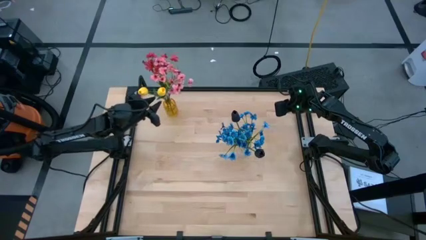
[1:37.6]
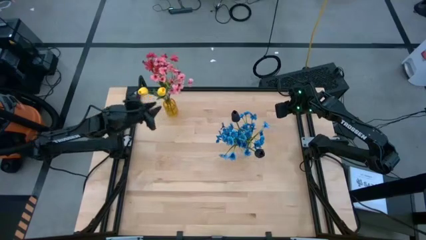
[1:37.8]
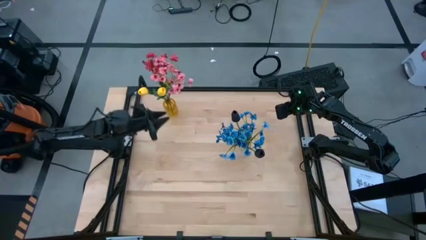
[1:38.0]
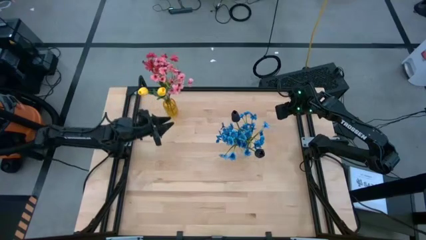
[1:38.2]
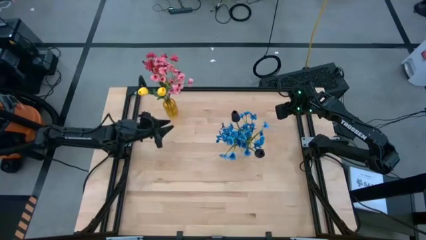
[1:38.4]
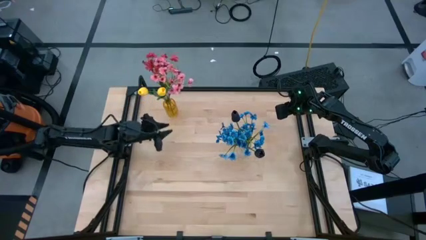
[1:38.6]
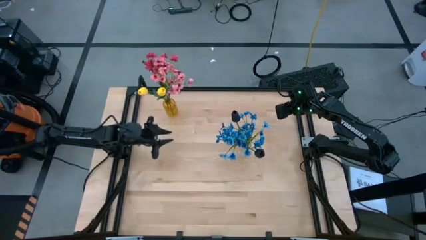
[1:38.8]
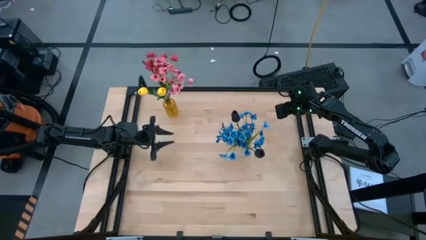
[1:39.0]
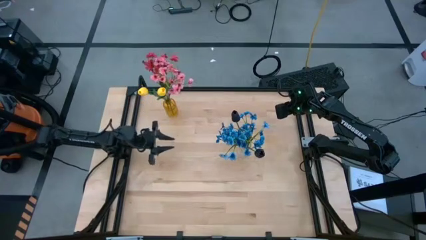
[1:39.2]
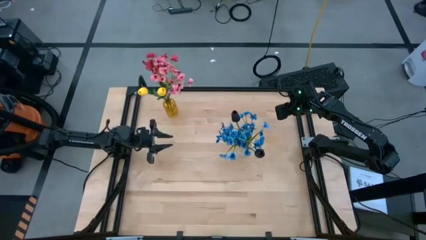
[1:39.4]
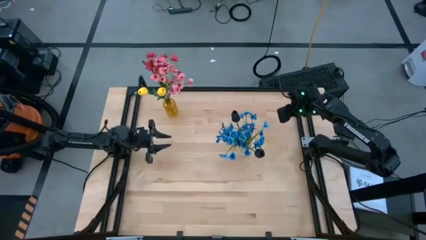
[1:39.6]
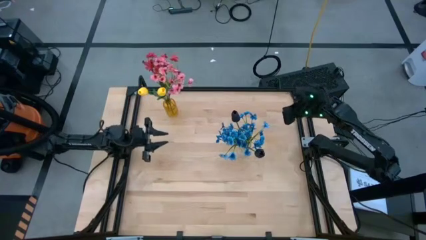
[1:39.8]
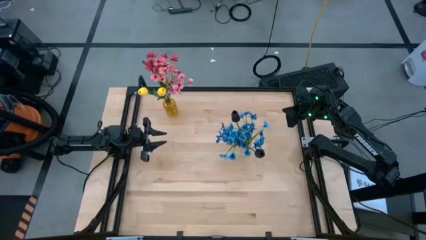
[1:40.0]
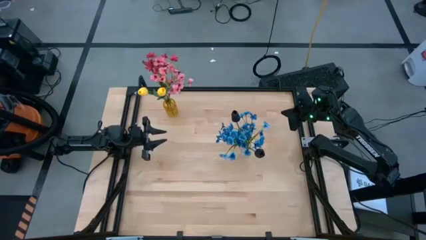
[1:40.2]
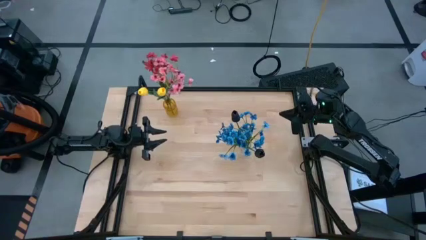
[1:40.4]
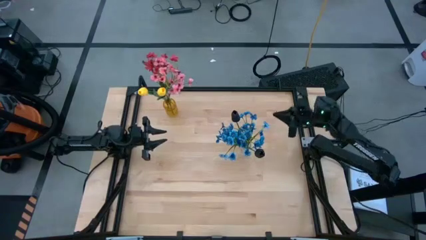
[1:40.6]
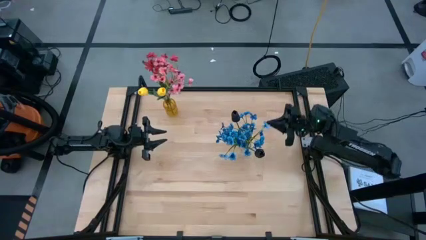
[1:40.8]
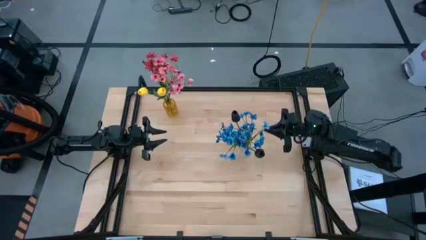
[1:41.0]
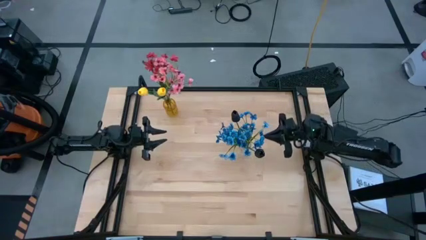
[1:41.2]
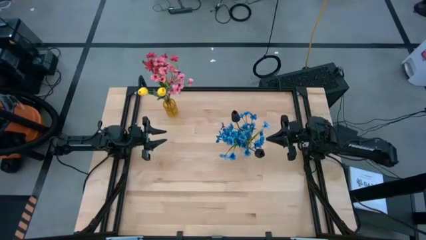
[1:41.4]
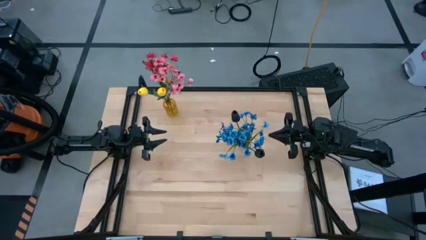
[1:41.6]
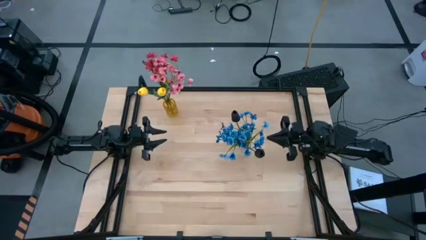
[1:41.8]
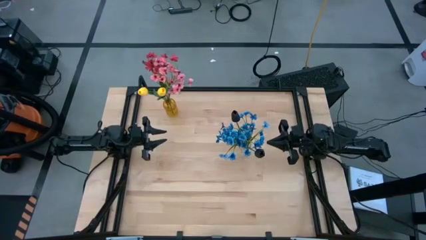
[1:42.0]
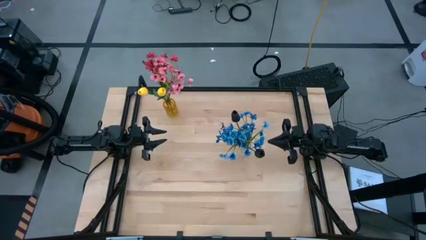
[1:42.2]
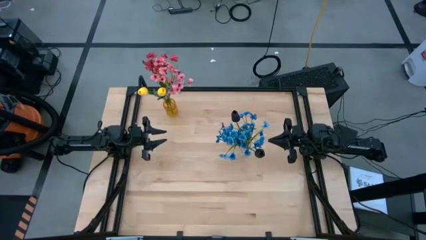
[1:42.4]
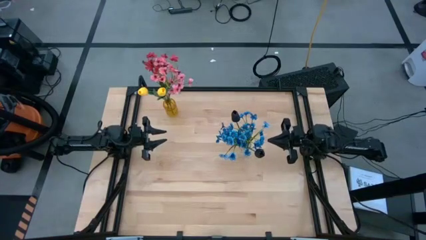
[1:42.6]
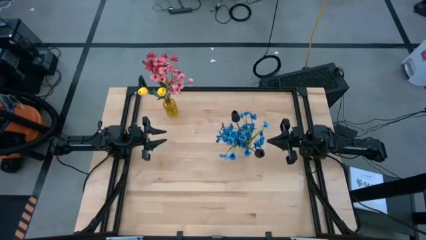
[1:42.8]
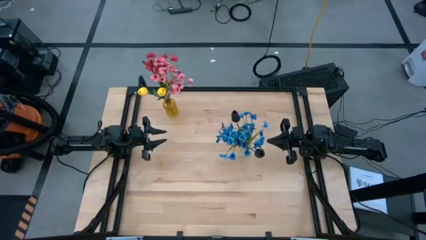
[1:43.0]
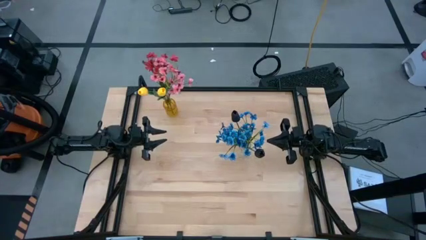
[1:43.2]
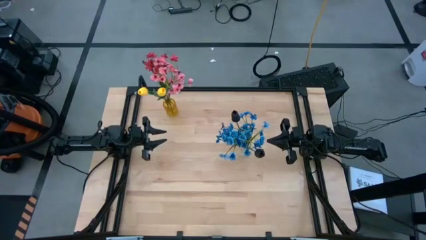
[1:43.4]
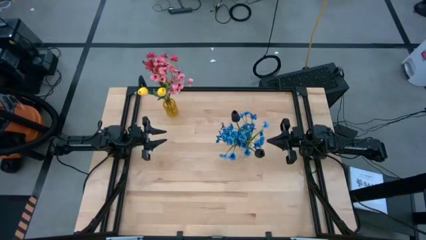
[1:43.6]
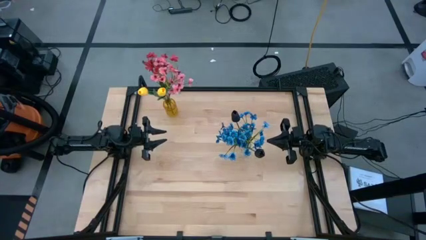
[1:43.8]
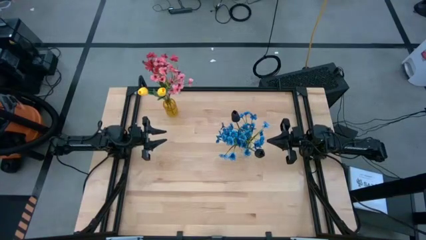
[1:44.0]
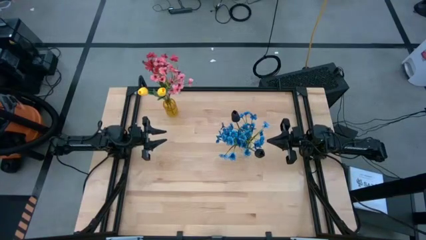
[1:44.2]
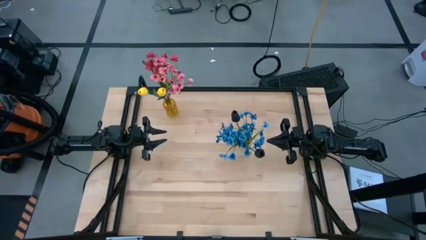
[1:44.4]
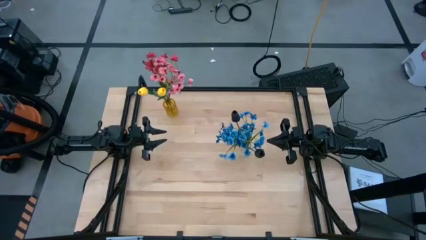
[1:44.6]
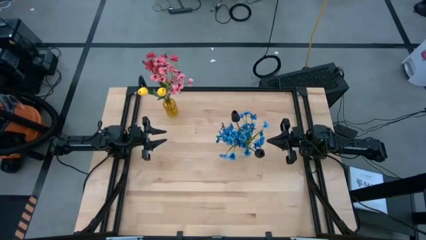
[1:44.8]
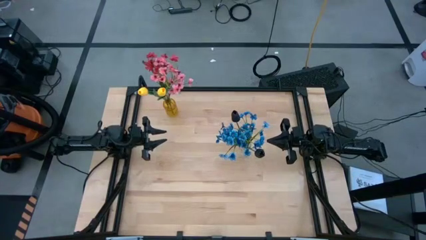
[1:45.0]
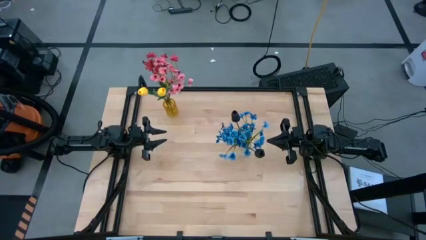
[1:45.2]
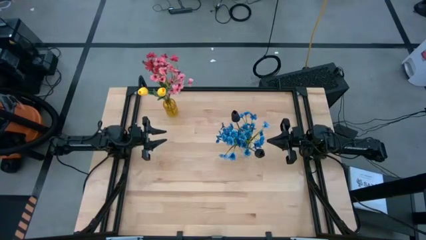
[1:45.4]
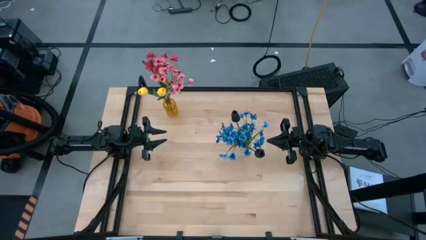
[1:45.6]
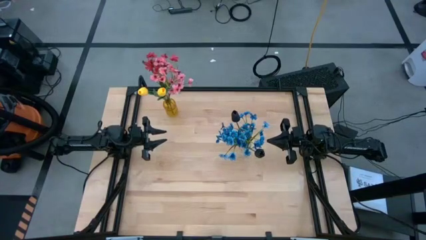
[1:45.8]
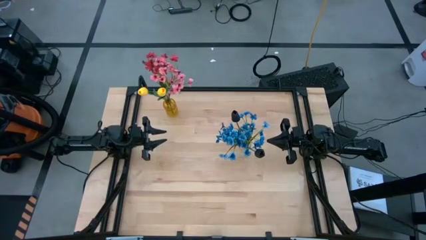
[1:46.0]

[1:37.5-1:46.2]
Task: Sort flowers into vase by color
Return to Home Position

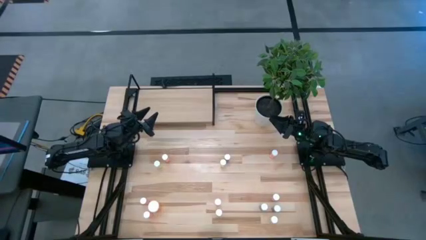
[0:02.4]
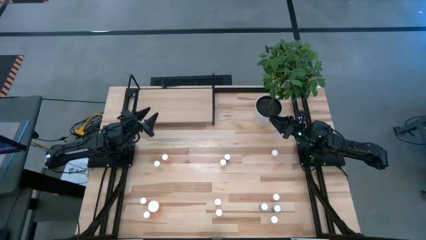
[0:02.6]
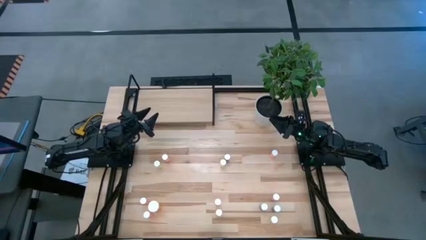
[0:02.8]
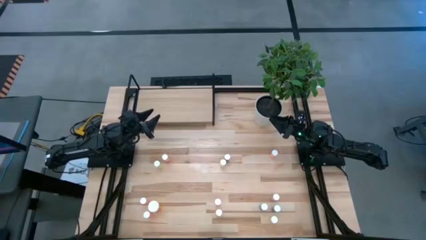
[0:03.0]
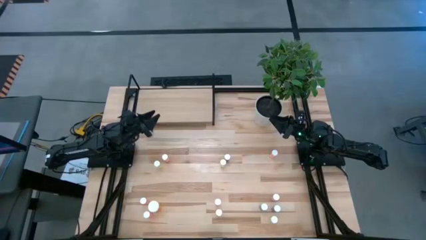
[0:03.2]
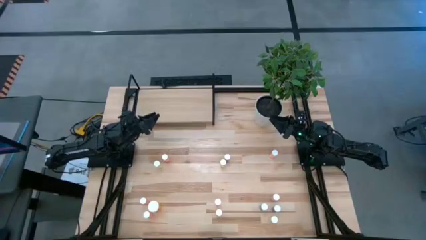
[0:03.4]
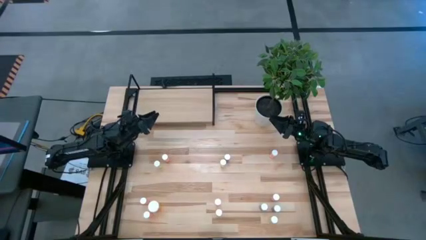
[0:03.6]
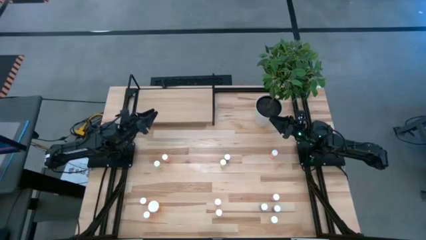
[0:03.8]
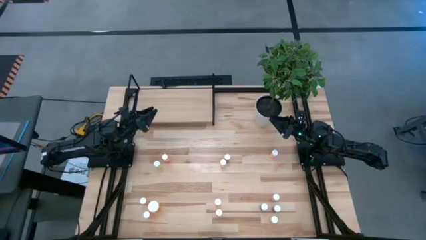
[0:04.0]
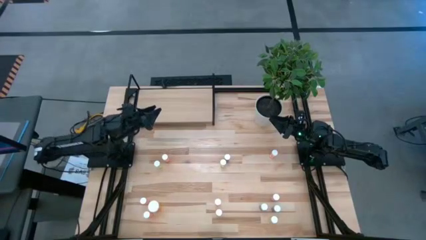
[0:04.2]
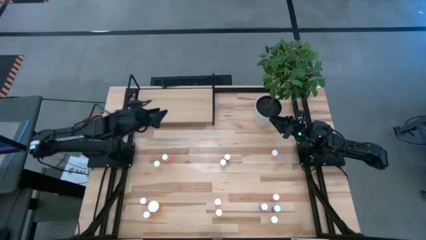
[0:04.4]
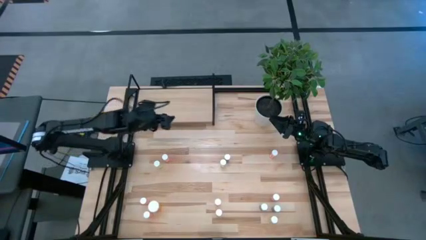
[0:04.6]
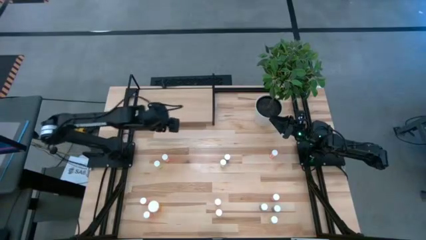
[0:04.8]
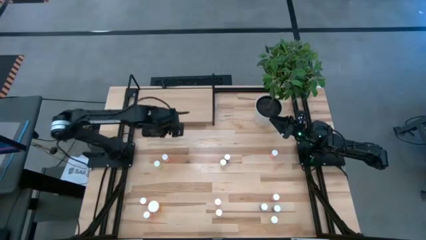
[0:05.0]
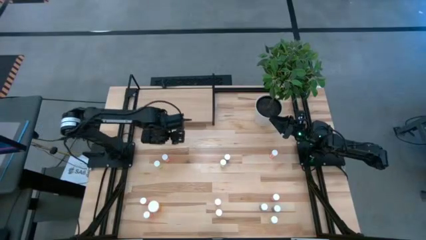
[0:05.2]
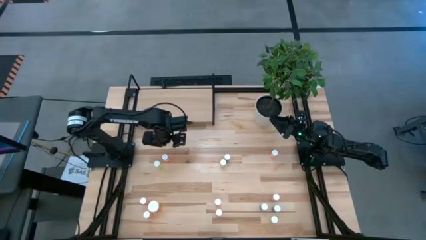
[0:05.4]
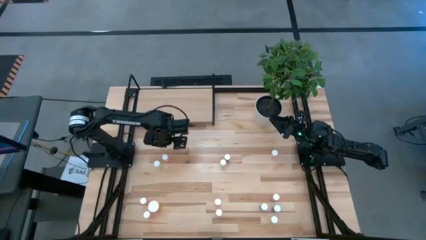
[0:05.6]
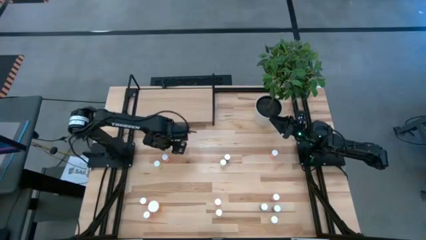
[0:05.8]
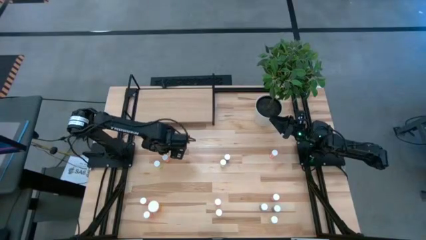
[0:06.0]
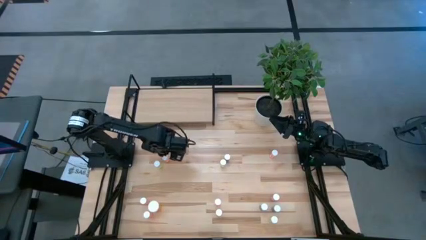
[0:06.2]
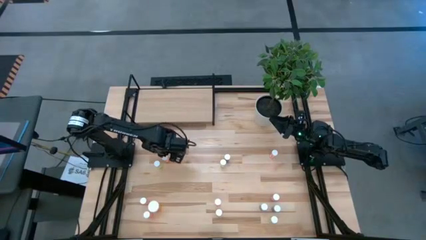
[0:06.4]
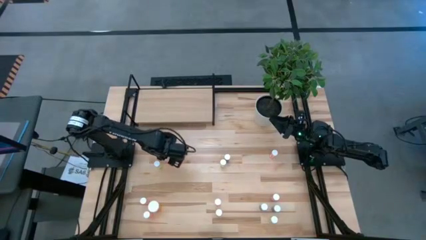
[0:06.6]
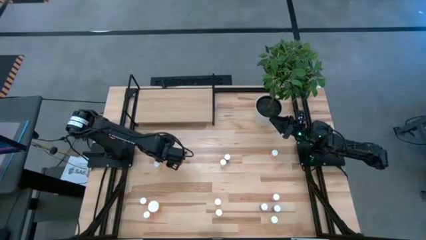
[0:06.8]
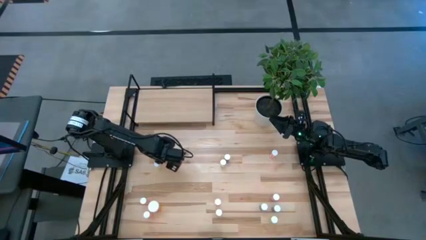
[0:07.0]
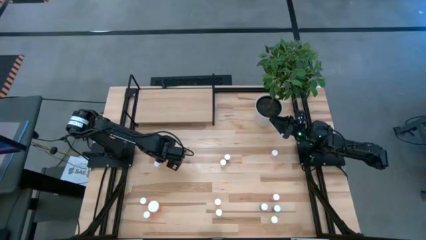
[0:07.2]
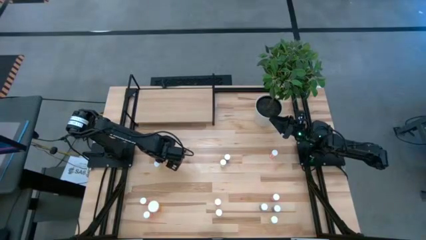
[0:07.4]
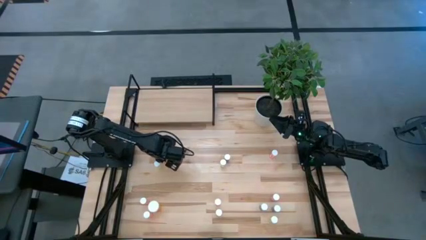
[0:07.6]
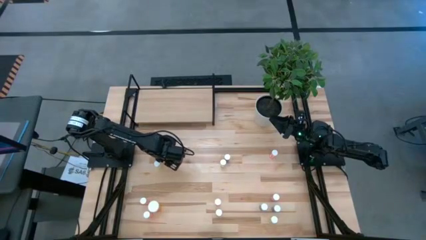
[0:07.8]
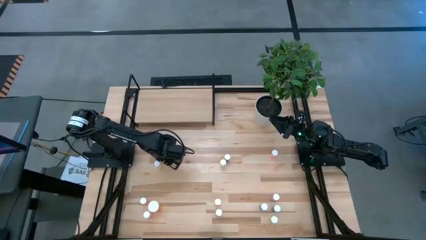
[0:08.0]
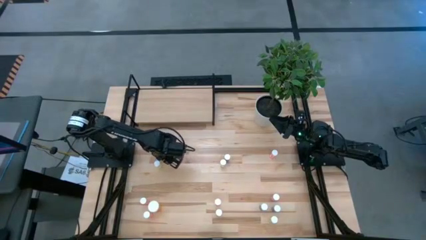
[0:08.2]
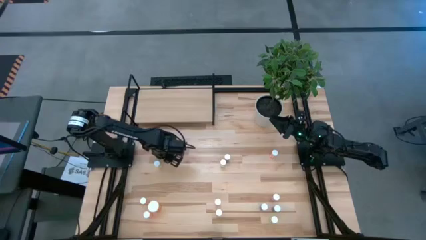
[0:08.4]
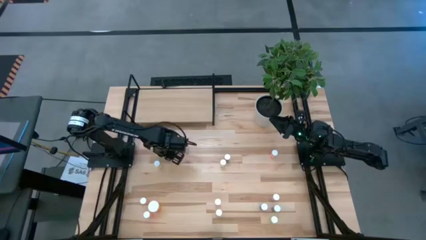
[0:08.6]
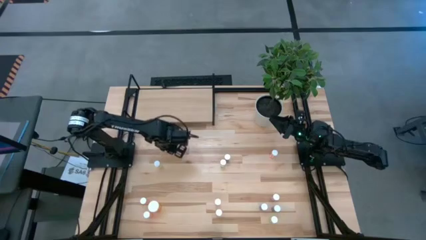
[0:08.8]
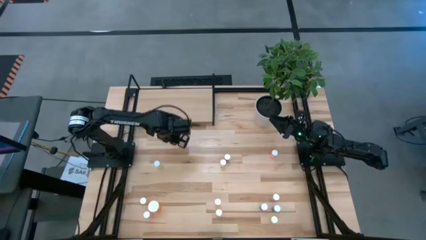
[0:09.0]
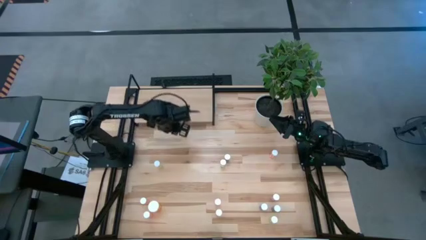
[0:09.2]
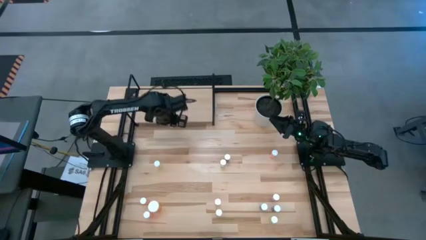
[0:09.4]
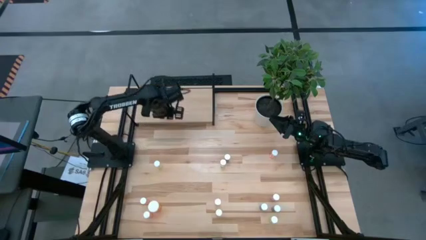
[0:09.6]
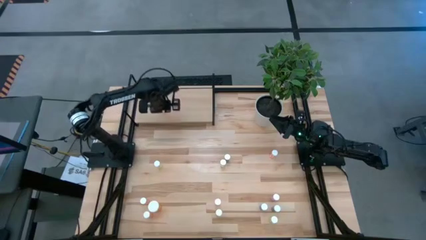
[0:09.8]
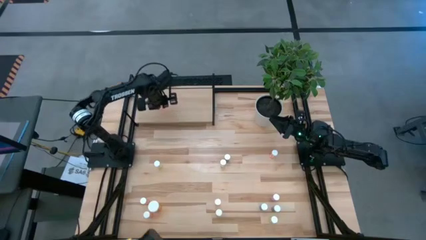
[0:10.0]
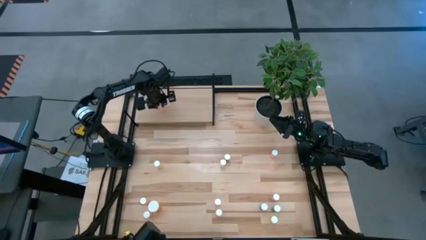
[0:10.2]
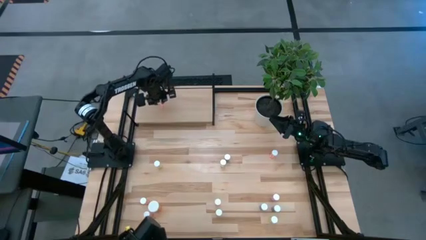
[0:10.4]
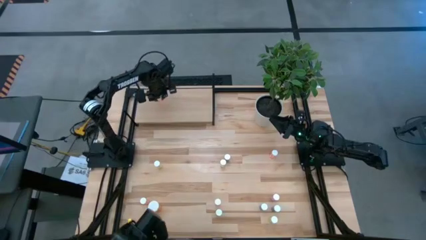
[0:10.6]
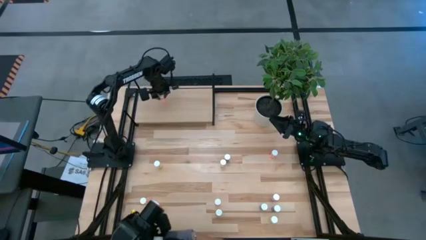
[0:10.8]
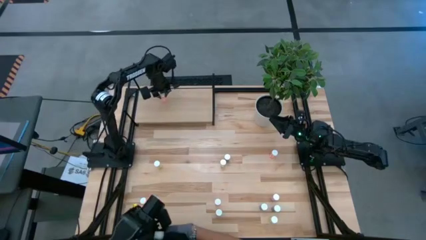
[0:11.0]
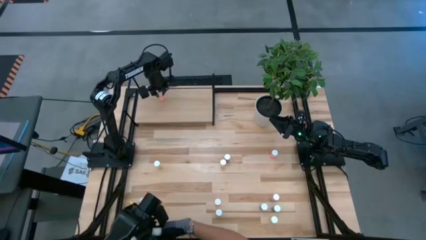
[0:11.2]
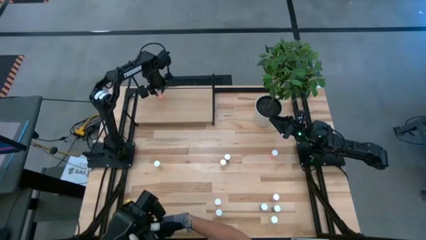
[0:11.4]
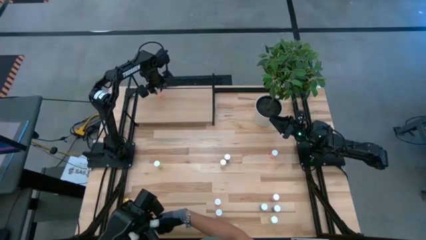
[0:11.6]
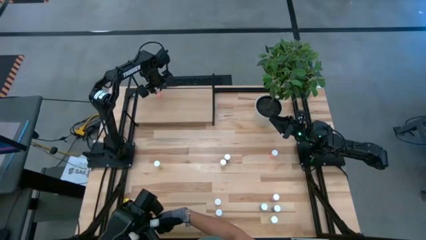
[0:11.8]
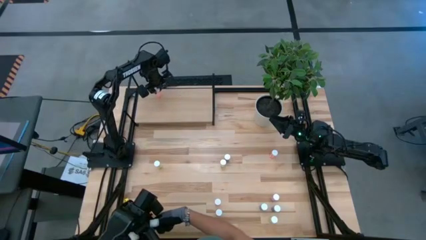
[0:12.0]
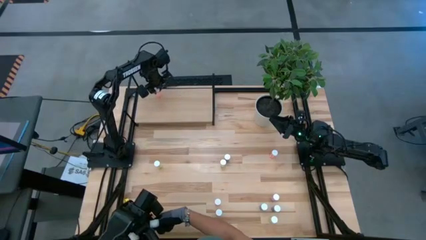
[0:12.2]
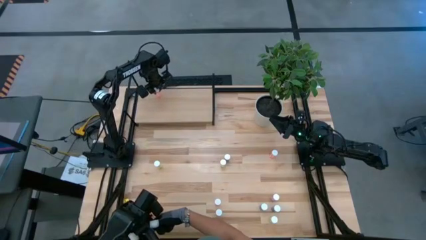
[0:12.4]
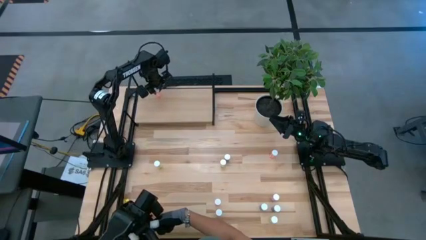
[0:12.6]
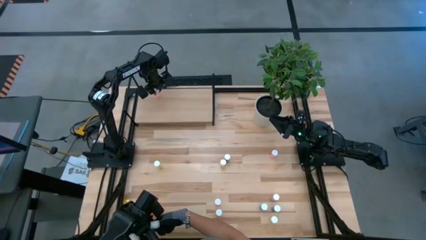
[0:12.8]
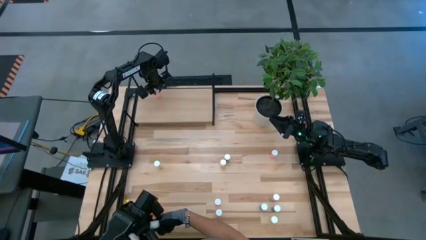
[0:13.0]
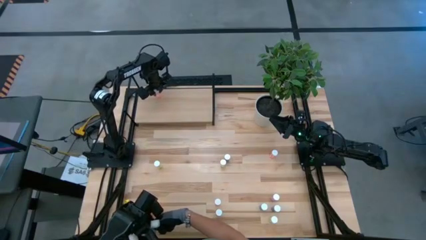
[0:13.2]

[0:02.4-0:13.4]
Task: Pick and place medicine bottles onto shelf by color
Put the pink pill bottle on the shelf
